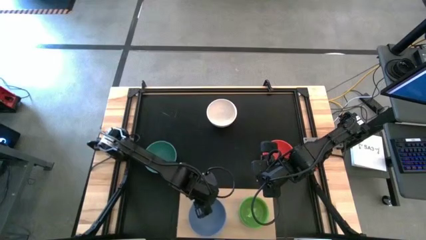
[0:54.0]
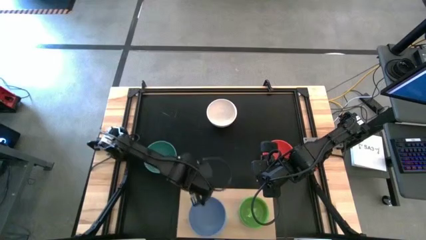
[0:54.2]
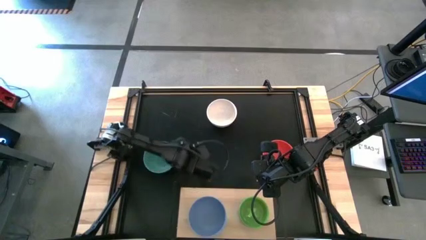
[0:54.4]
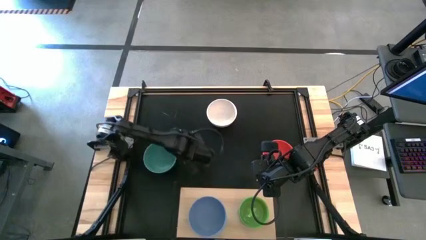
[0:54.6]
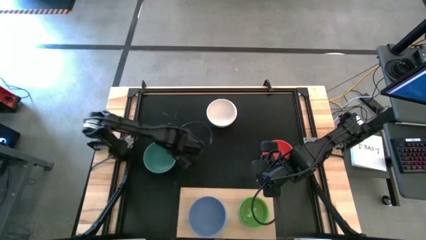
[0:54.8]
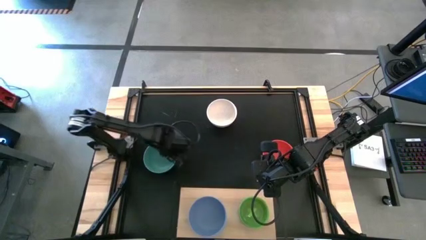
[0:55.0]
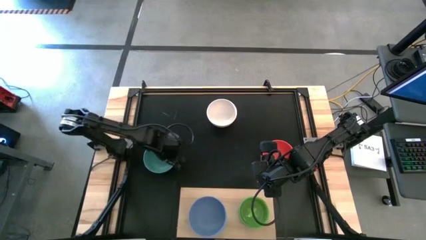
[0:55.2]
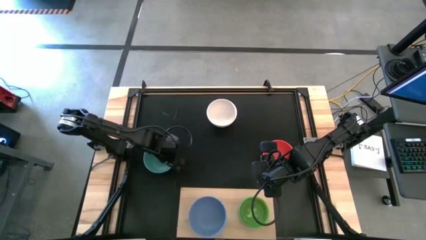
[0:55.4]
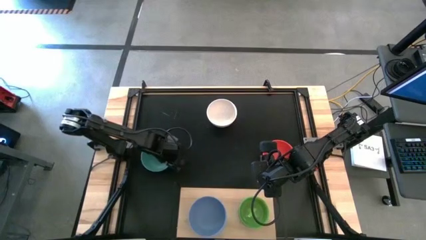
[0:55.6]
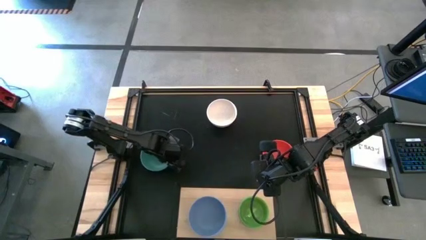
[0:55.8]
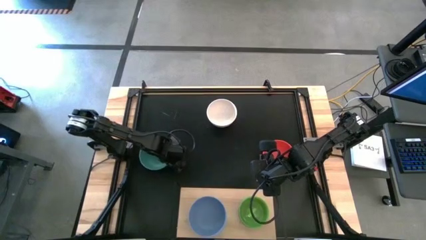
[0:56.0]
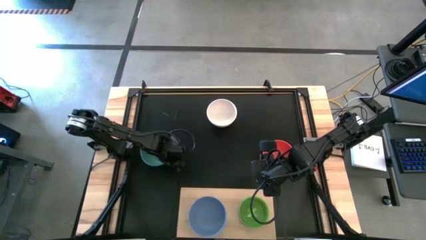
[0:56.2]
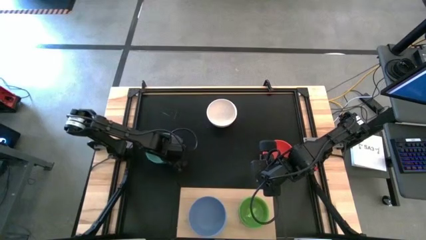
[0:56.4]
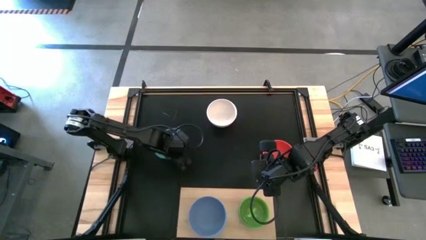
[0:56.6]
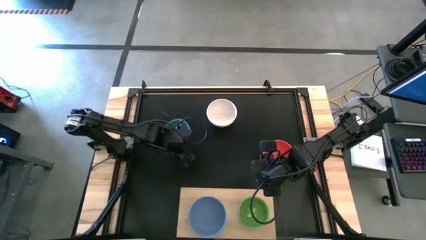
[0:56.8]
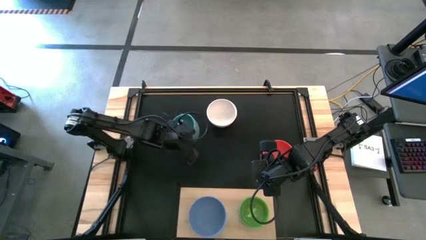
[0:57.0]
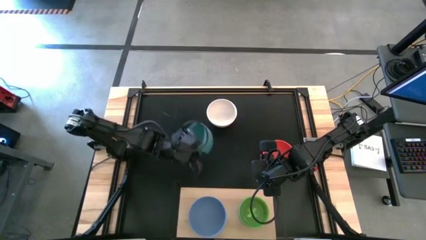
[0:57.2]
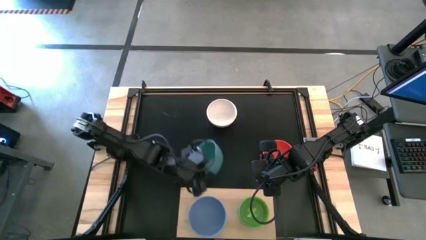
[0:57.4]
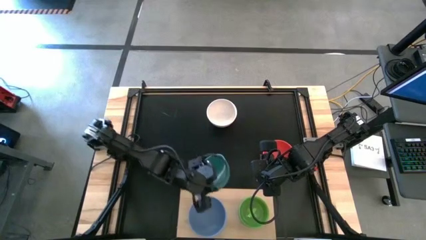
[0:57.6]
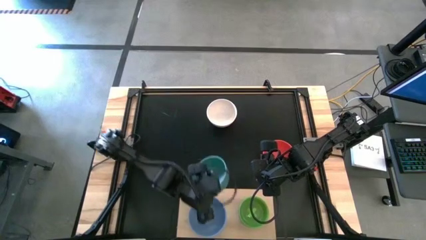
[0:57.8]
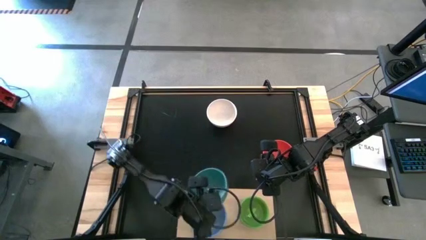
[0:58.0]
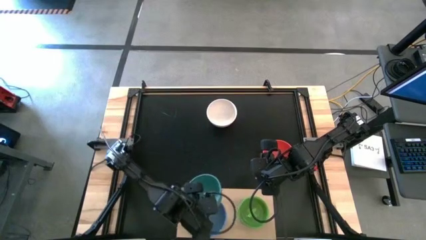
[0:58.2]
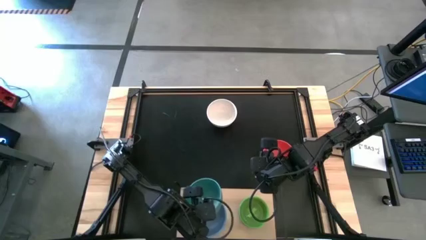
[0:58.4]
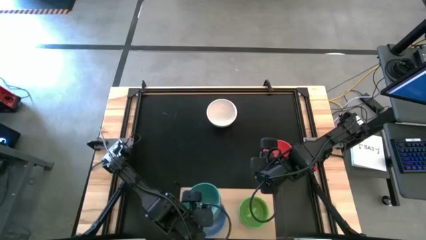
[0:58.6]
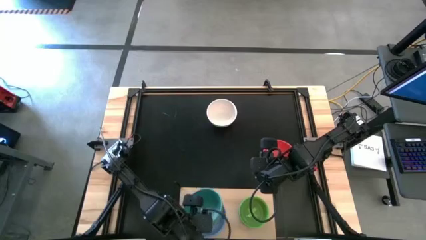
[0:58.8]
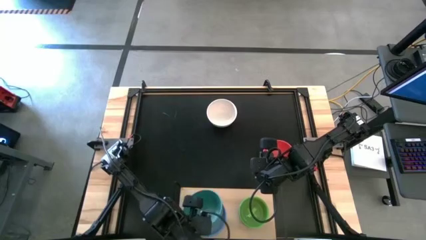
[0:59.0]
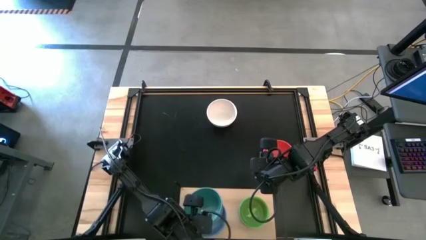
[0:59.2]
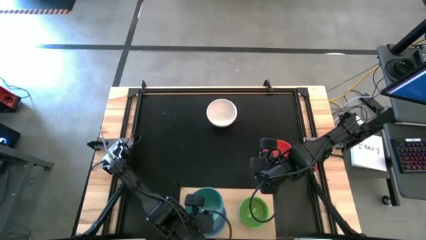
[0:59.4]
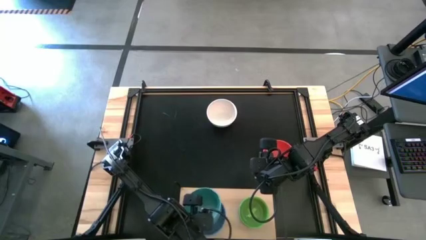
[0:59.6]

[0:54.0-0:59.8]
Task: Place and stack bowls onto a shelf
Stack the big green bowl on top of the big blue bowl on the shelf

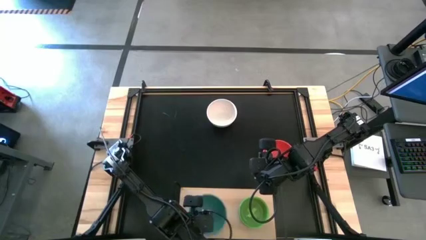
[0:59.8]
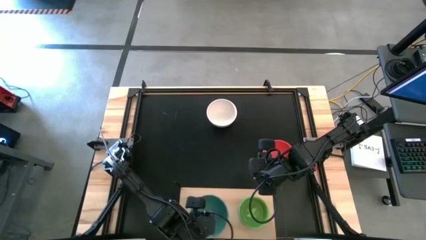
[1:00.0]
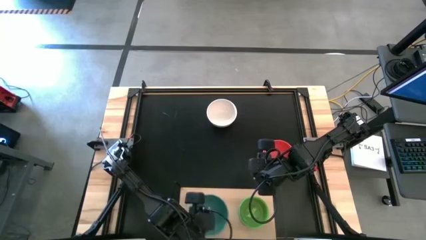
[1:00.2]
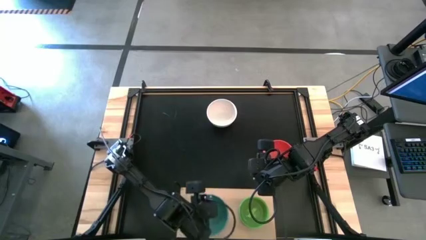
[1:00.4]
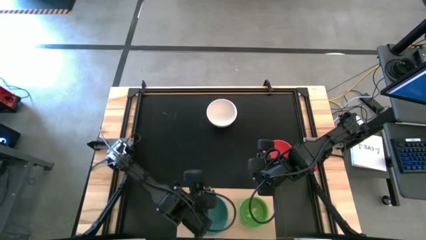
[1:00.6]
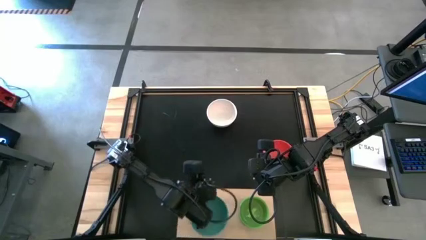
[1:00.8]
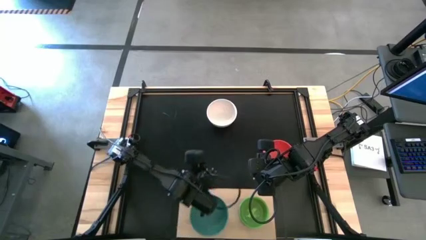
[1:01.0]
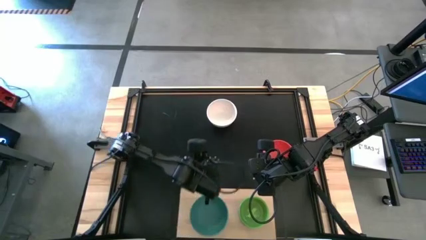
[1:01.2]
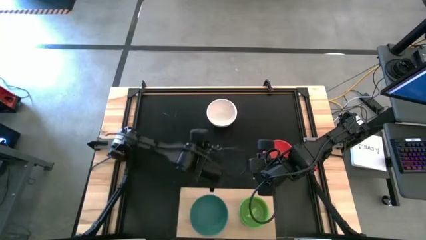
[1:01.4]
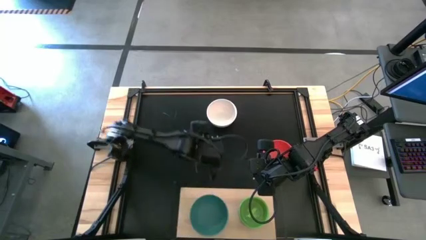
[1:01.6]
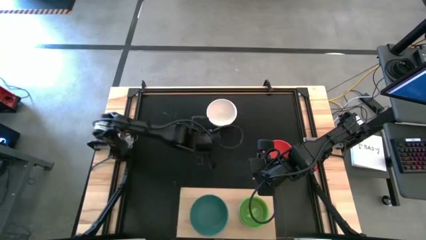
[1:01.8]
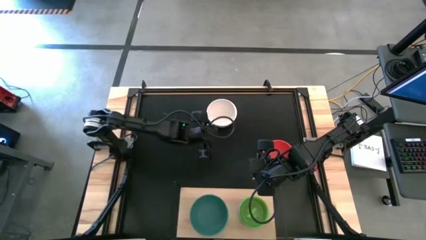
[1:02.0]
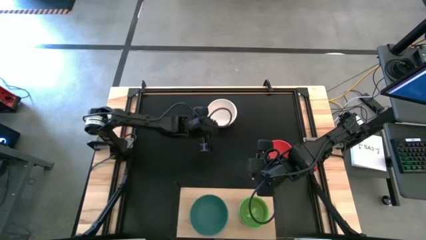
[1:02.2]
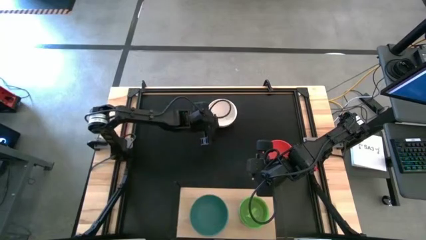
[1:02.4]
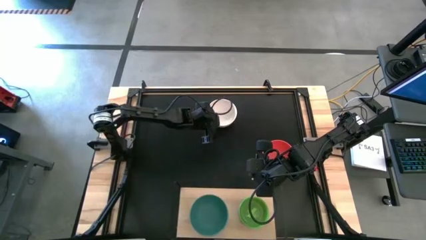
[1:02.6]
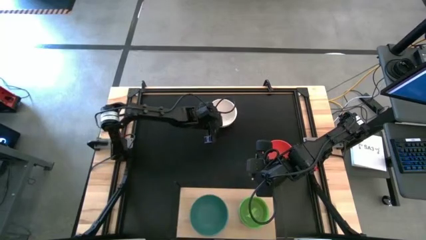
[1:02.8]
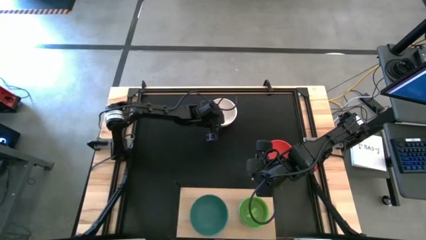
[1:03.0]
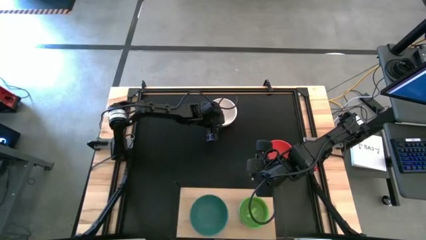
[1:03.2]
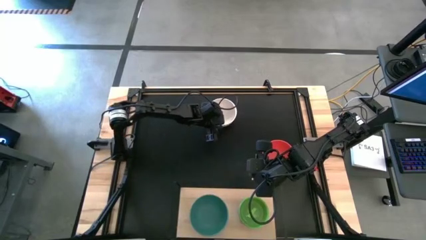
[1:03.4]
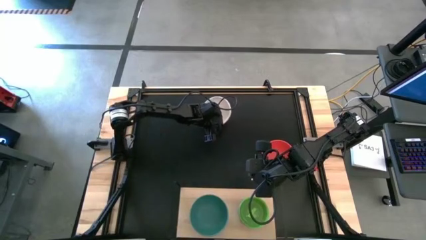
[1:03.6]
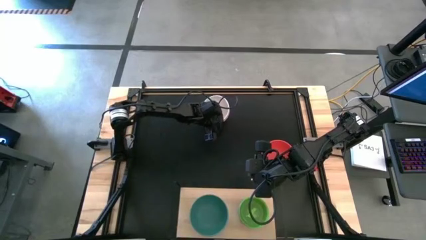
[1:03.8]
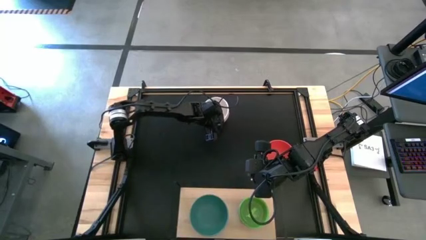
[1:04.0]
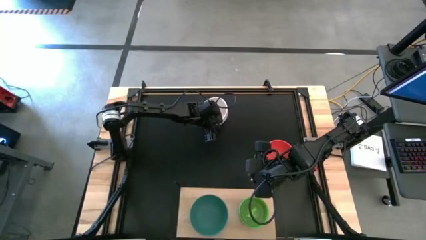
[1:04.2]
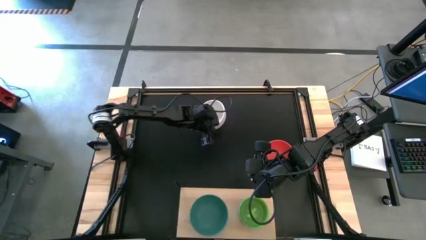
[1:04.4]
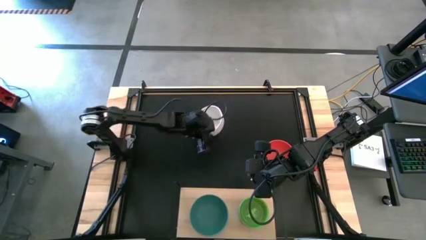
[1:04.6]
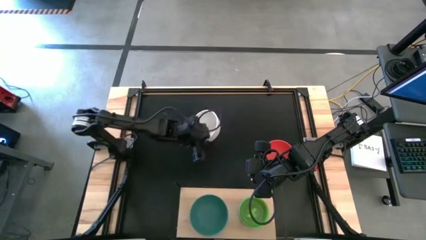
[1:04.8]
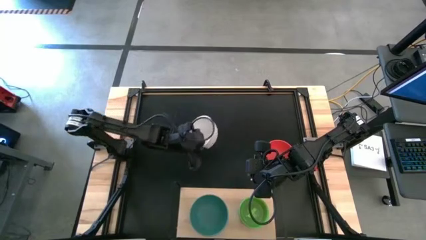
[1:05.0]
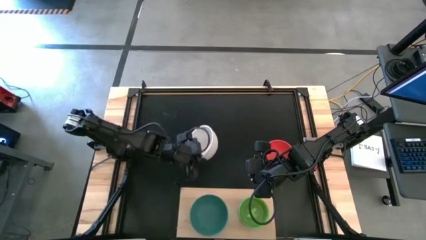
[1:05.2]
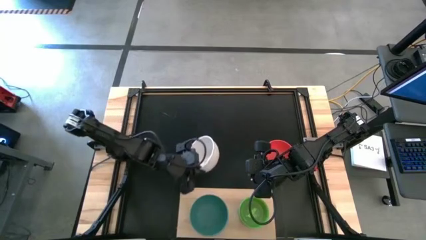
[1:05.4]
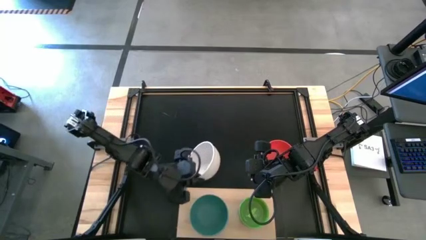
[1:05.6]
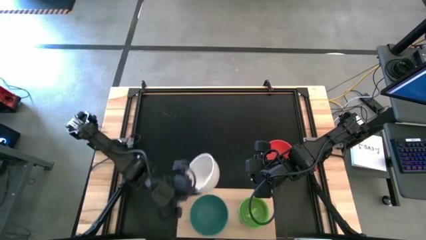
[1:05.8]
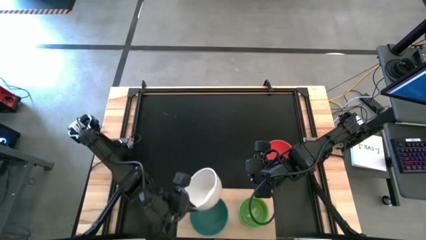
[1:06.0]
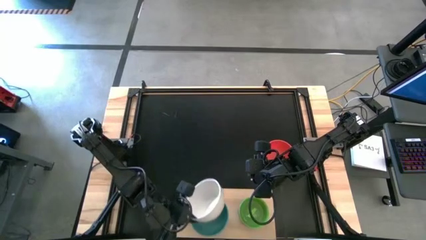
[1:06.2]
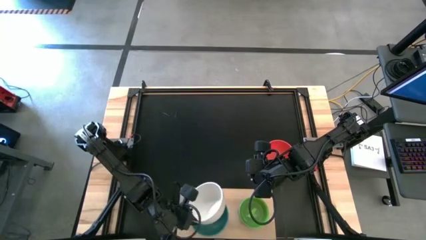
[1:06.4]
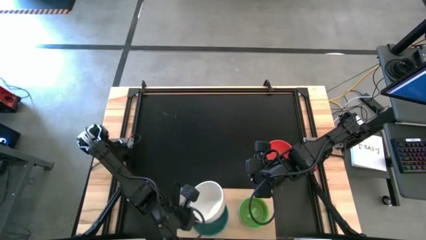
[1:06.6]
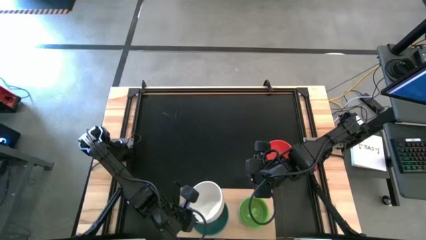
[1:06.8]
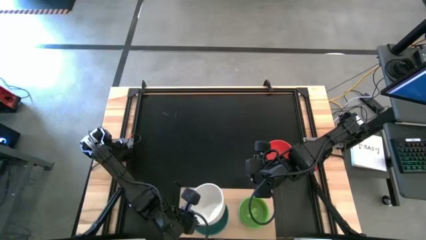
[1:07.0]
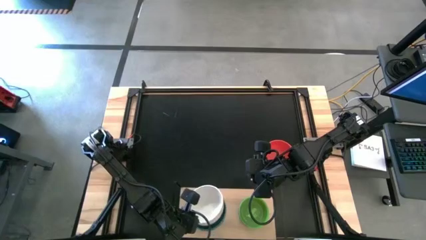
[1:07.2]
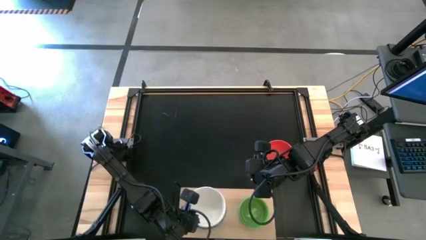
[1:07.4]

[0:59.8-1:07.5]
Stack the big white bowl on top of the big green bowl on the shelf
